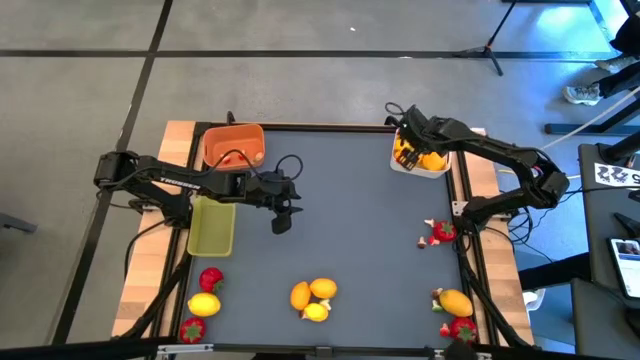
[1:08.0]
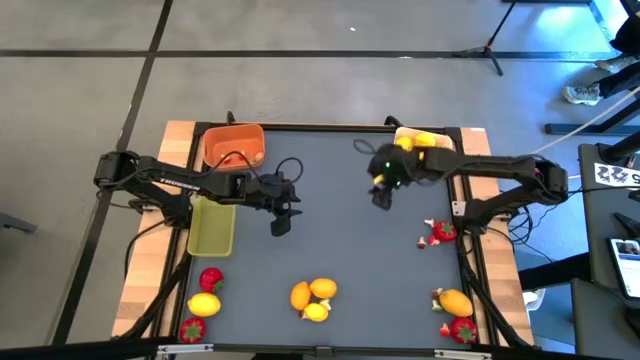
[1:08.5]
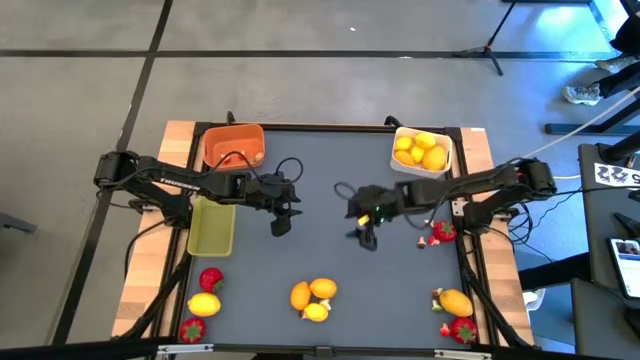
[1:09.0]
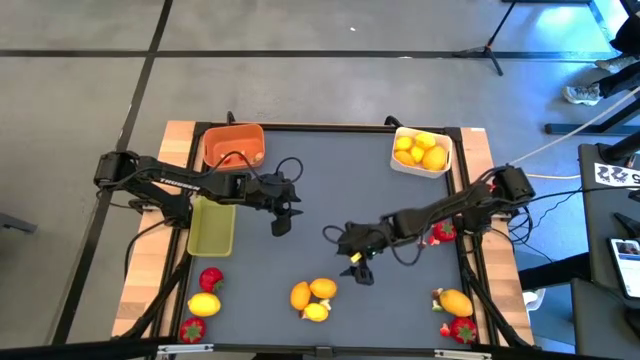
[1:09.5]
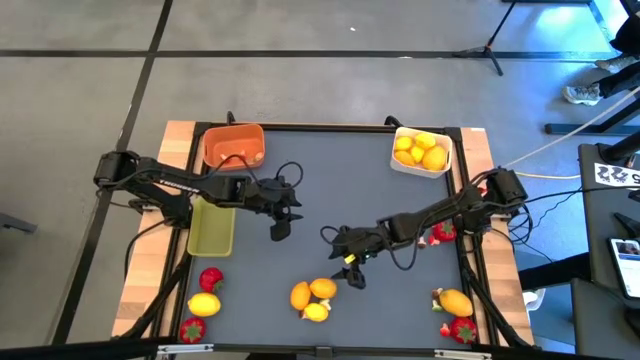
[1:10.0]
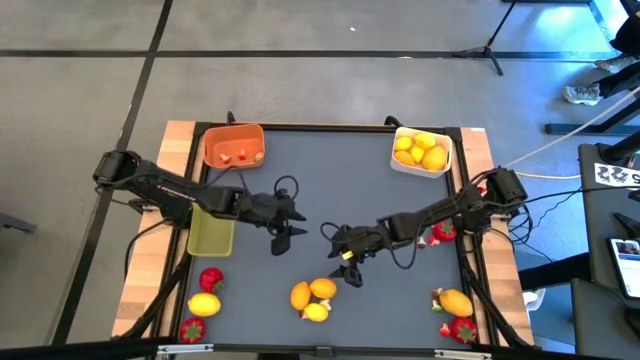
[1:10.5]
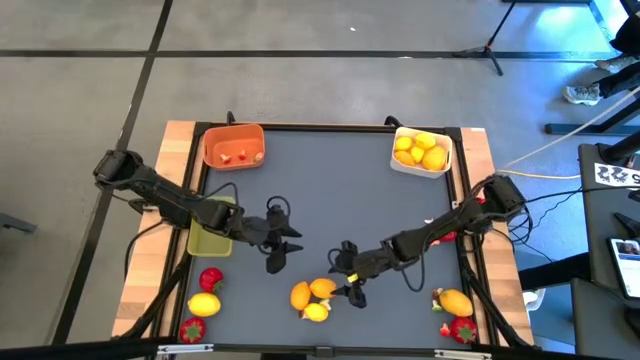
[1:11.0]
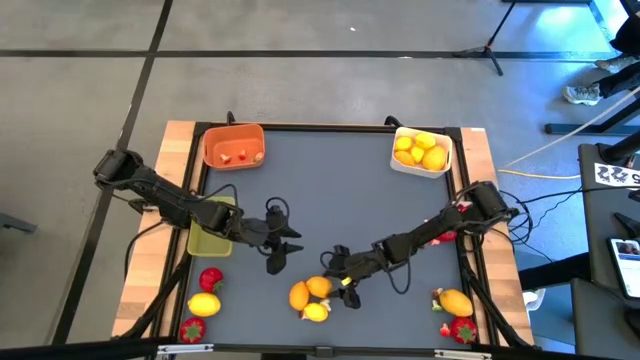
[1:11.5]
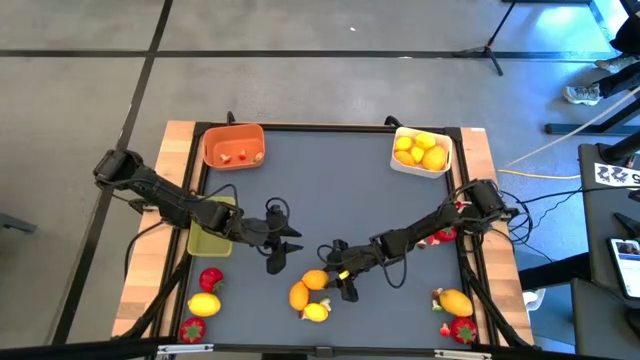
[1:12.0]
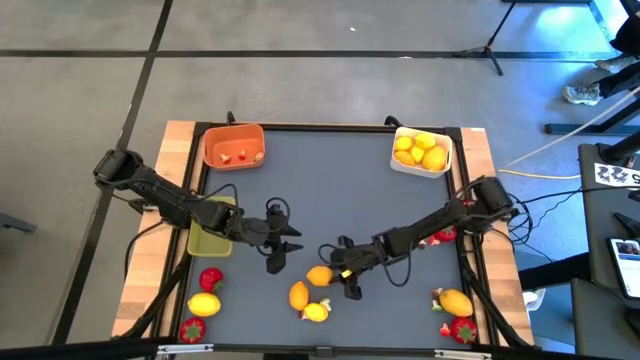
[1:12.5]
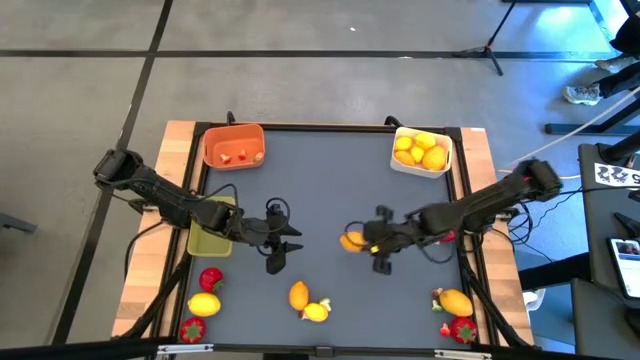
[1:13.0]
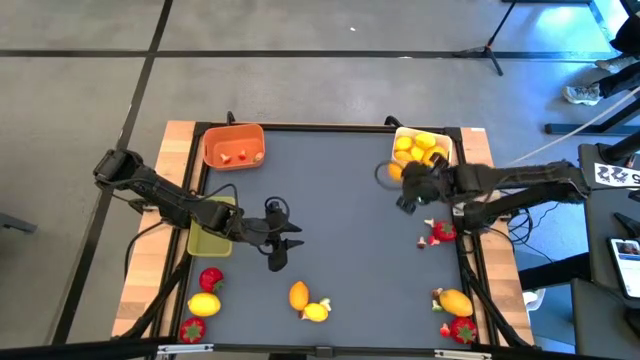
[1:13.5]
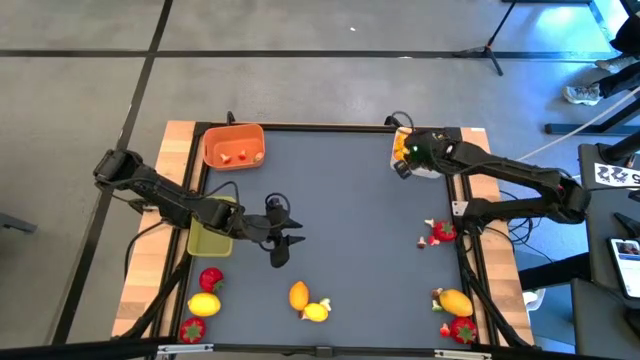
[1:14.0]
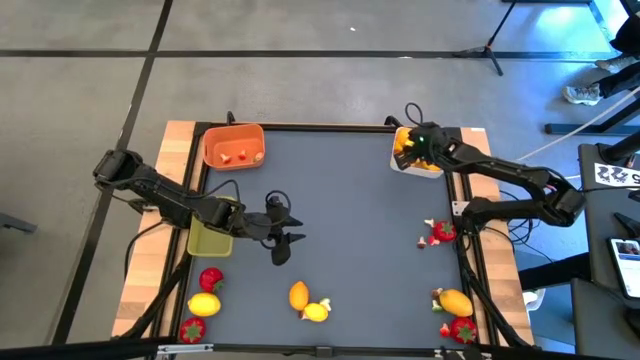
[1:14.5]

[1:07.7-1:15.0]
Task: Sort produce into baskets
Put the lemon into the white bin

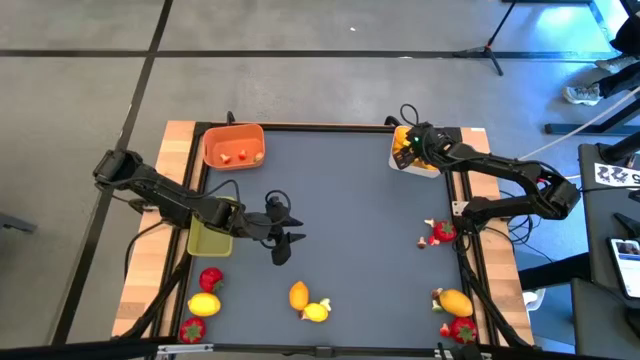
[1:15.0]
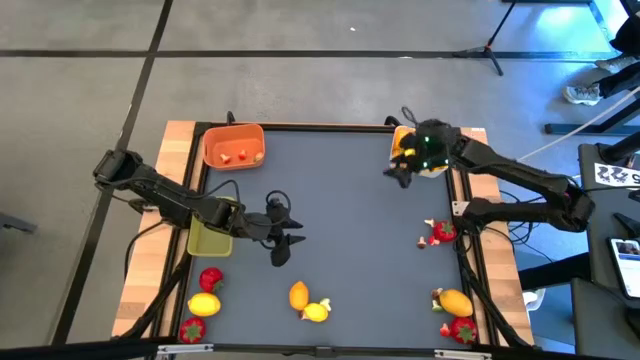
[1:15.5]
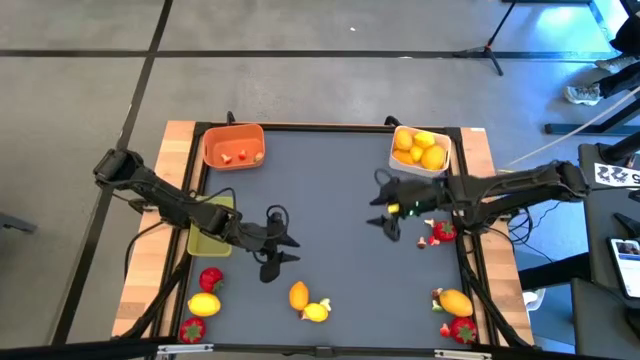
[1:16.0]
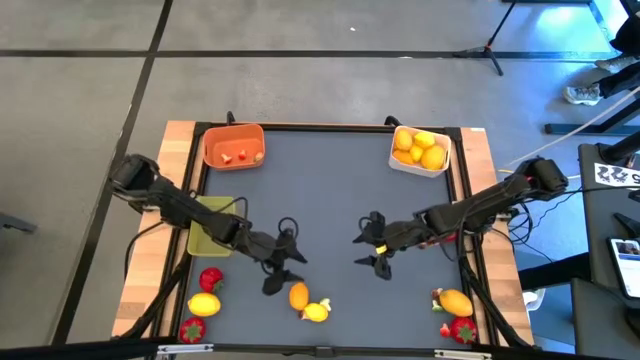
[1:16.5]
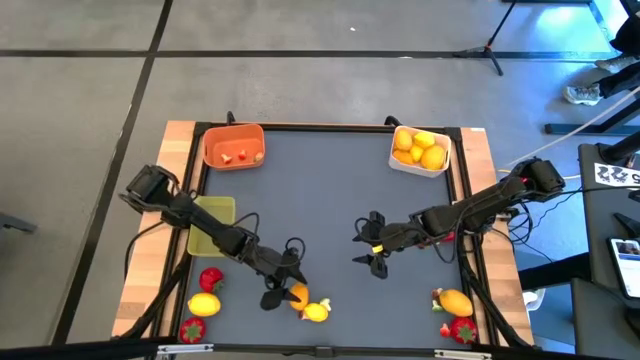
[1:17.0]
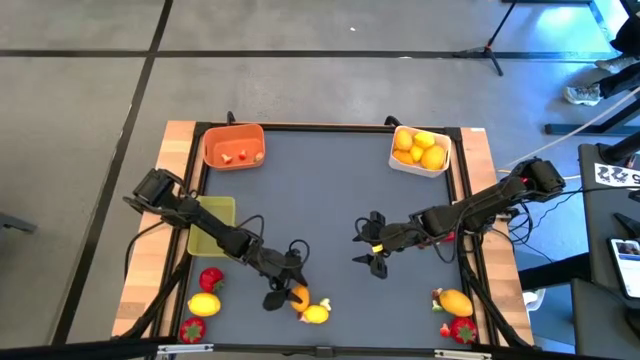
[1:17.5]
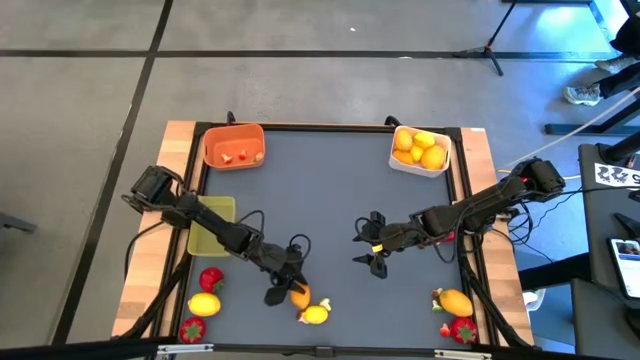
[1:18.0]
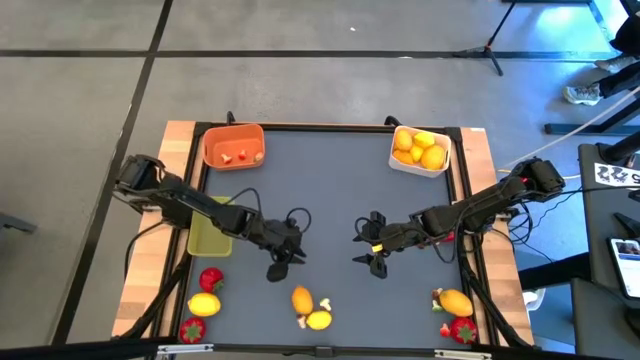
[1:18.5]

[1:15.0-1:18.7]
Put the lemon into the white bin

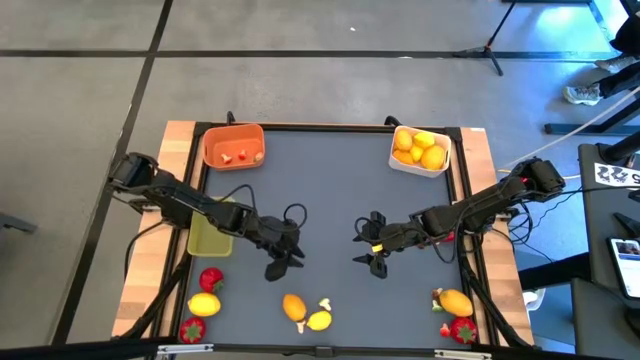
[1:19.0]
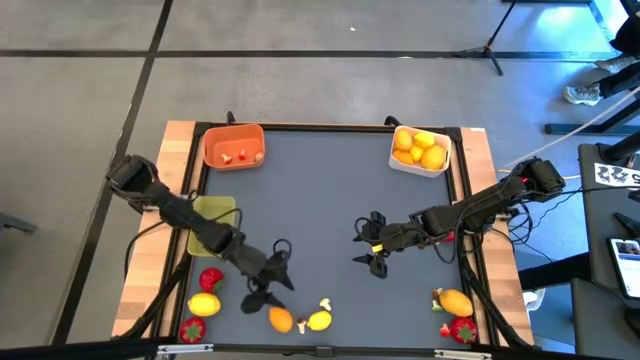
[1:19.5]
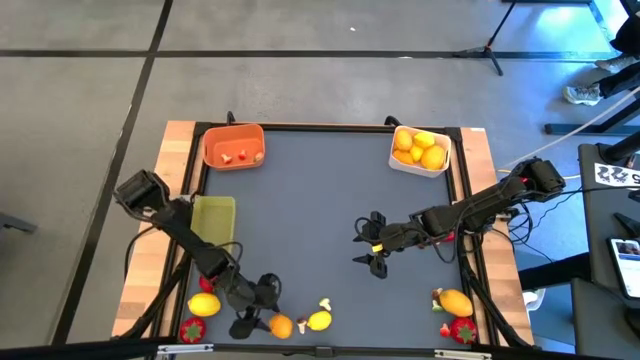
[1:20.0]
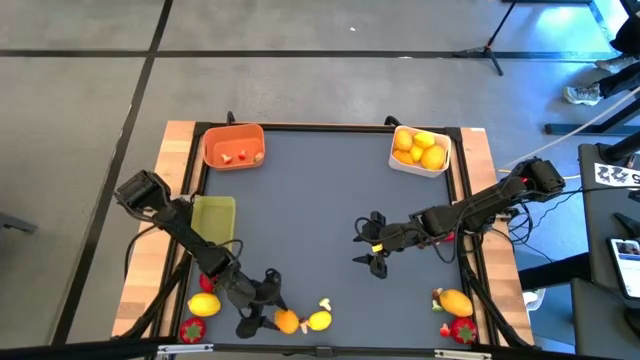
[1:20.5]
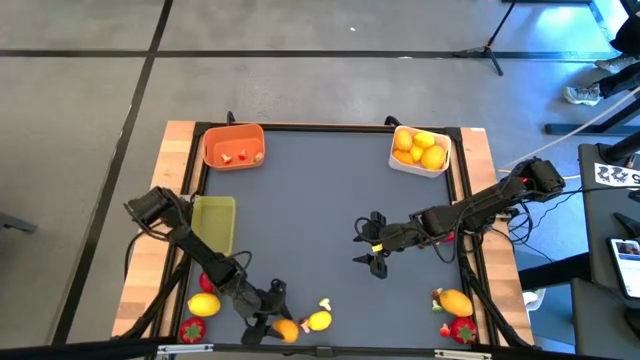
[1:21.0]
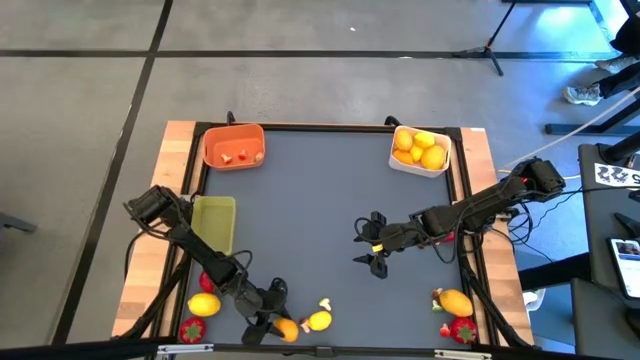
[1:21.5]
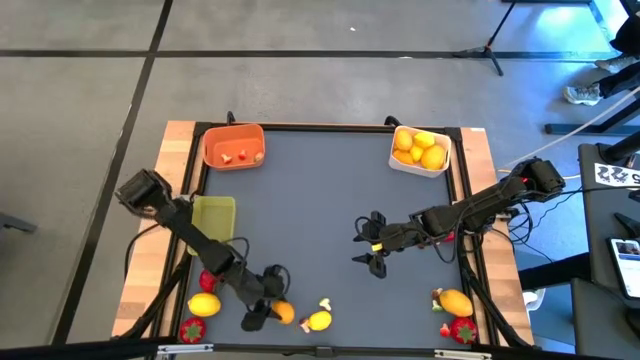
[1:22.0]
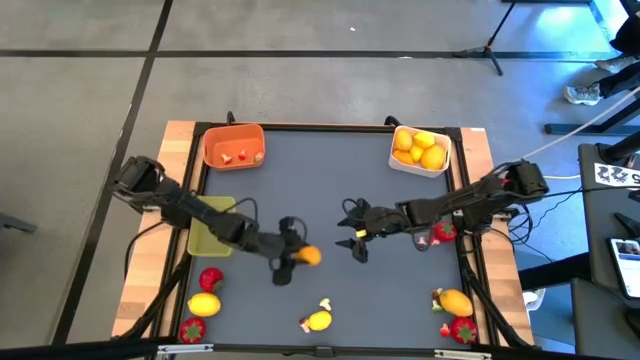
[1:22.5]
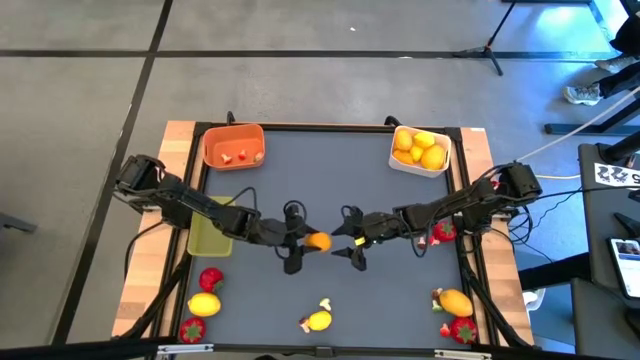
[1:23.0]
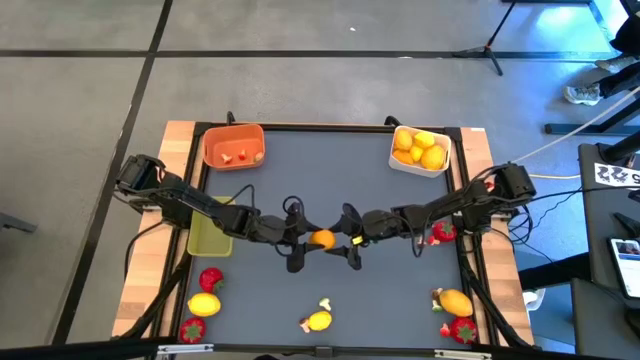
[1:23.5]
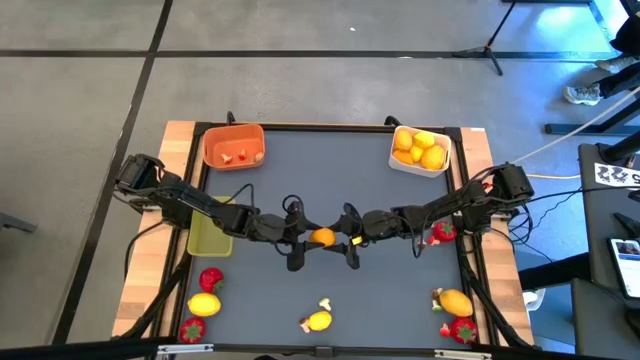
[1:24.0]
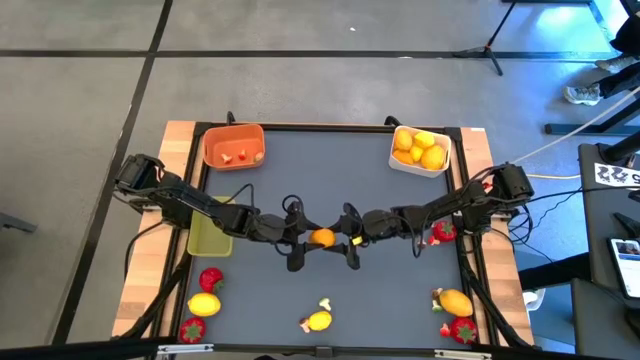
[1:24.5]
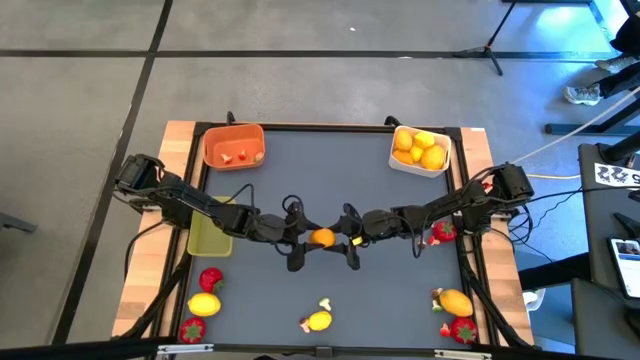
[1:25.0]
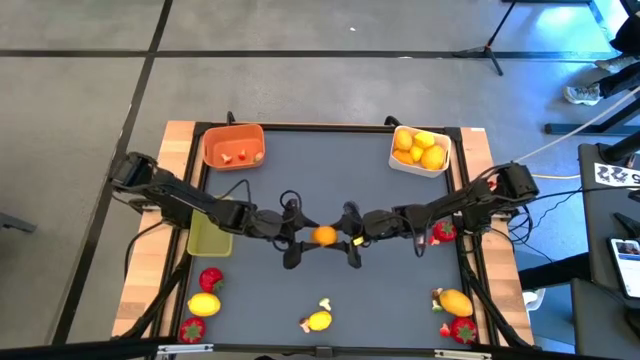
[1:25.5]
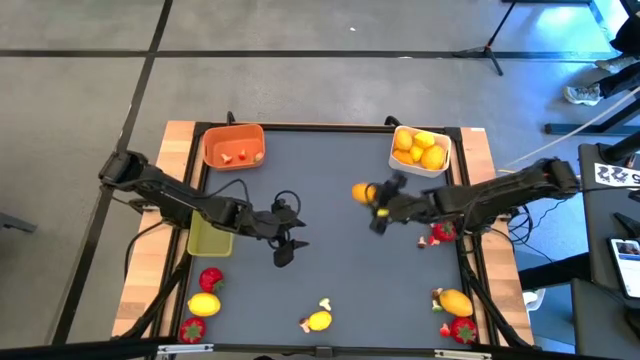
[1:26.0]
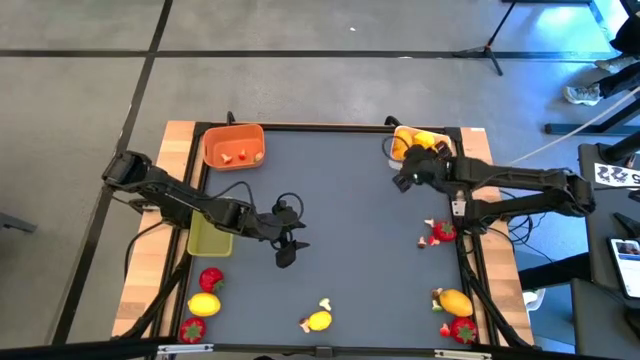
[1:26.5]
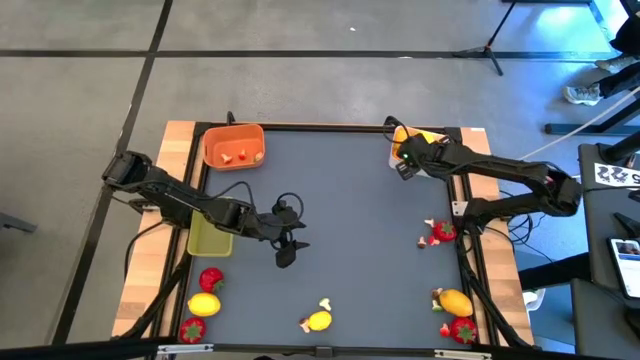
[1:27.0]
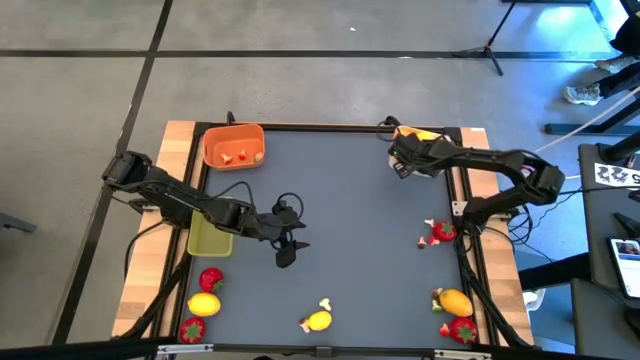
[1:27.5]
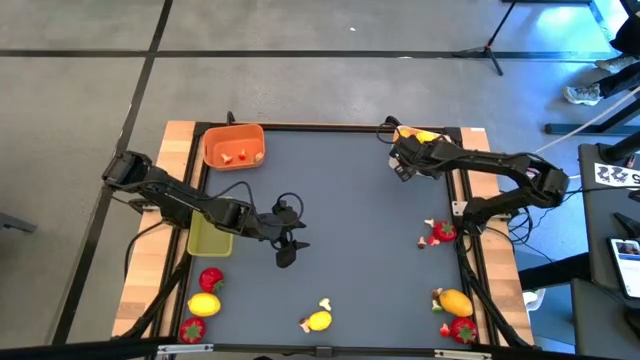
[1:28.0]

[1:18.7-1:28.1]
Put the lemon into the white bin

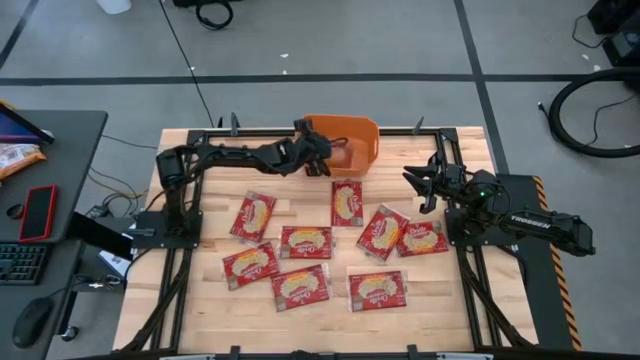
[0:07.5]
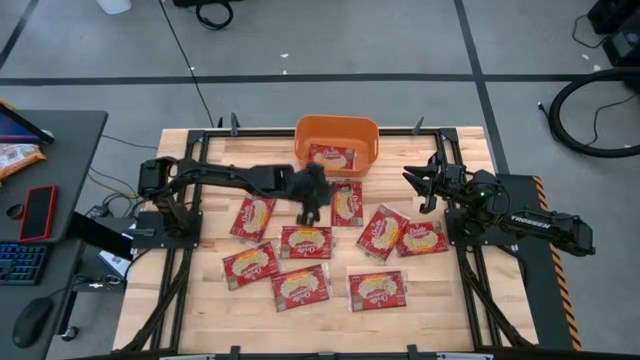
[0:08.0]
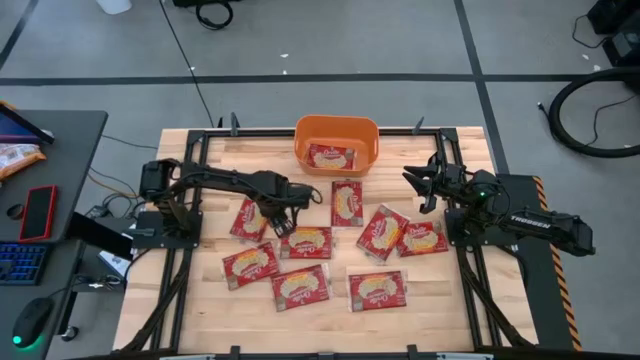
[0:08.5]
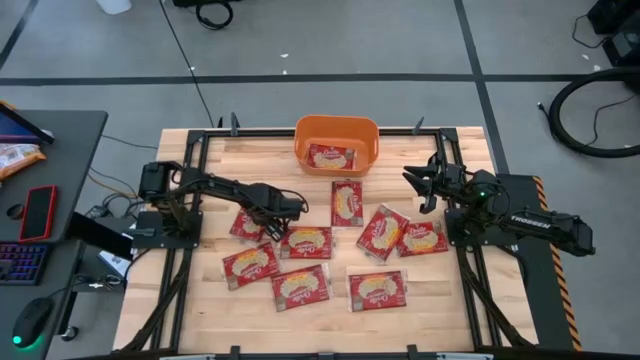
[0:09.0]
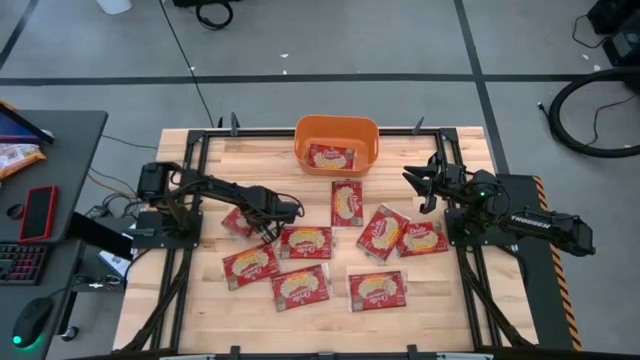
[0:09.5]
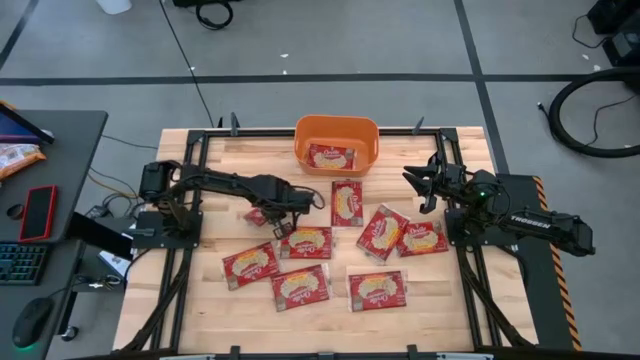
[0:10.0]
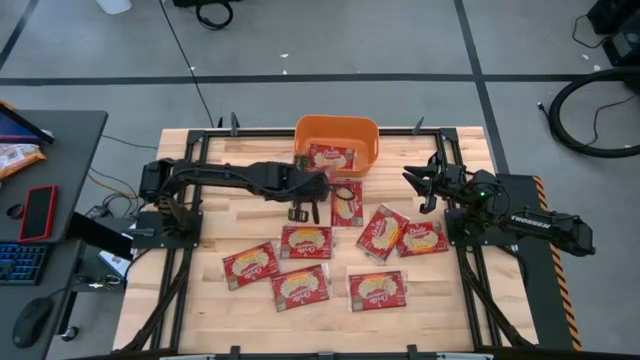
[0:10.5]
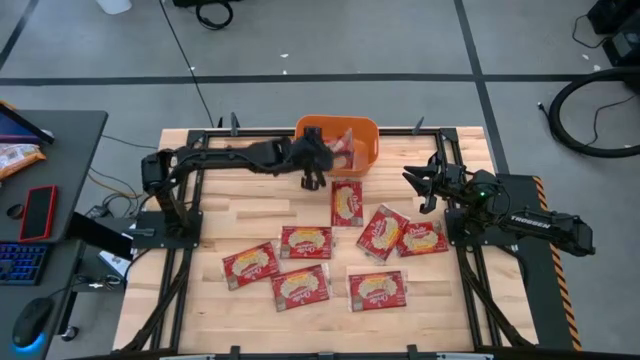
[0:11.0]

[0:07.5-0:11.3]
Task: Sort popcorn bags into baskets
Put the red popcorn bag into the orange bin
